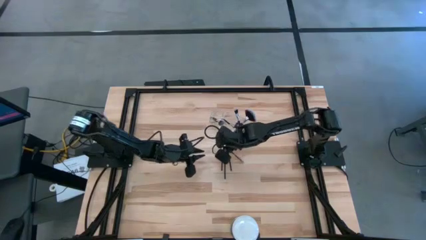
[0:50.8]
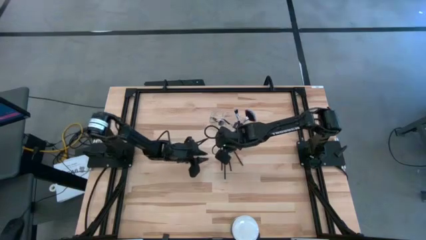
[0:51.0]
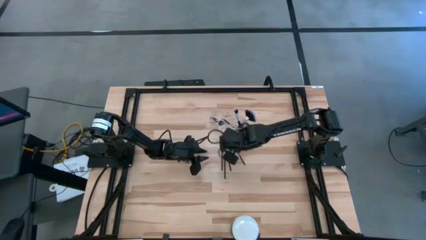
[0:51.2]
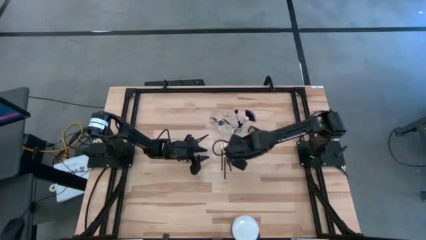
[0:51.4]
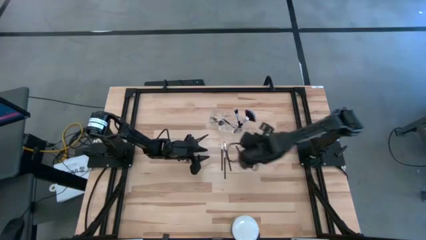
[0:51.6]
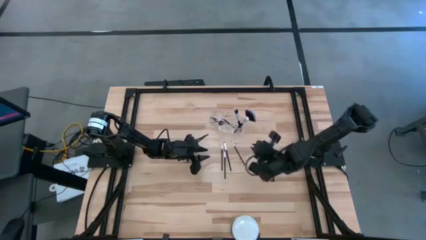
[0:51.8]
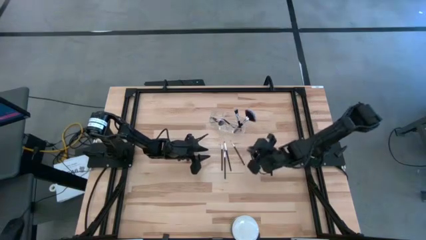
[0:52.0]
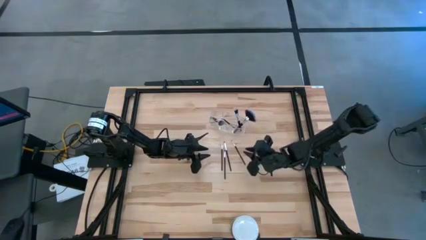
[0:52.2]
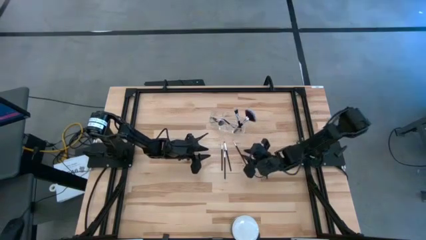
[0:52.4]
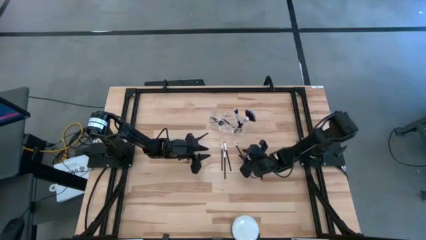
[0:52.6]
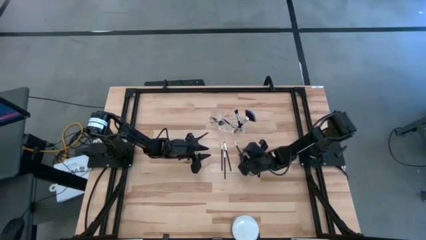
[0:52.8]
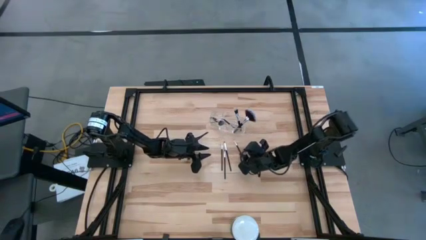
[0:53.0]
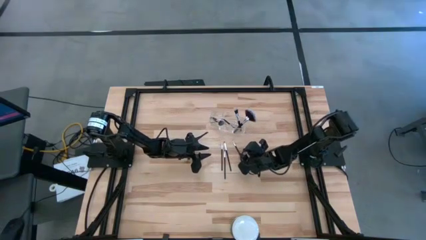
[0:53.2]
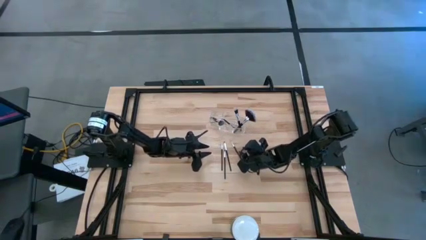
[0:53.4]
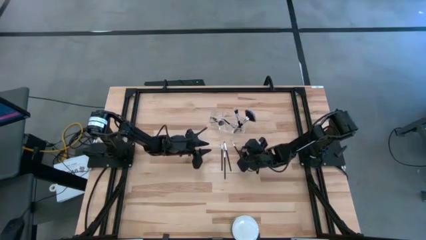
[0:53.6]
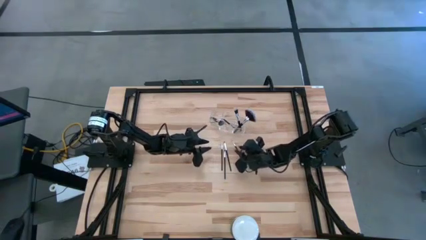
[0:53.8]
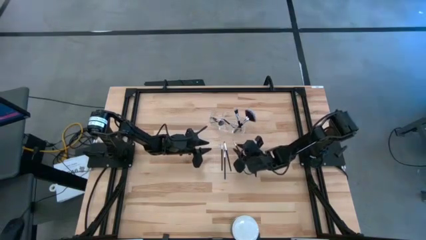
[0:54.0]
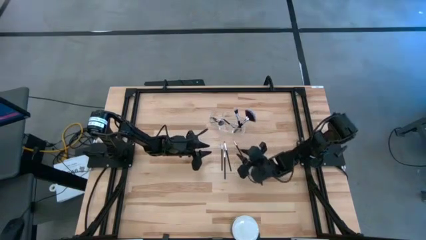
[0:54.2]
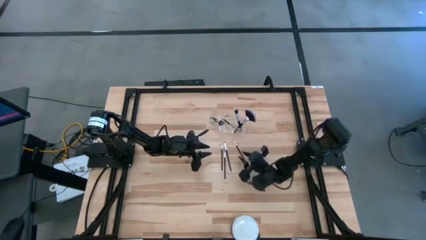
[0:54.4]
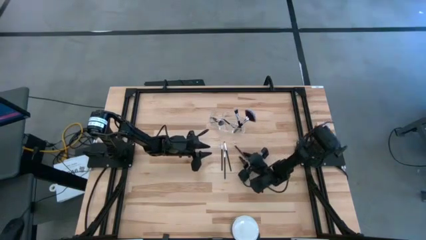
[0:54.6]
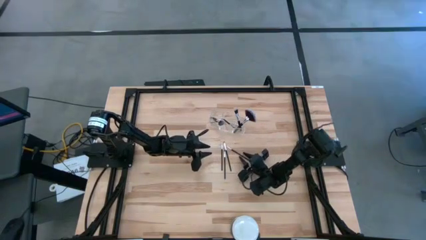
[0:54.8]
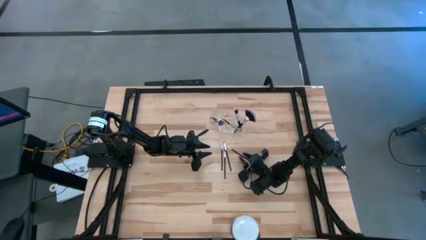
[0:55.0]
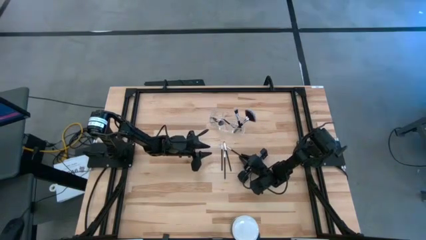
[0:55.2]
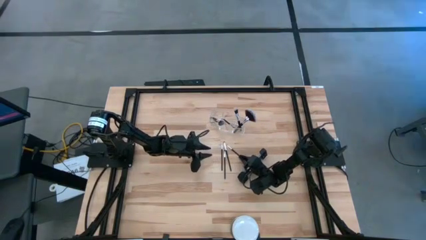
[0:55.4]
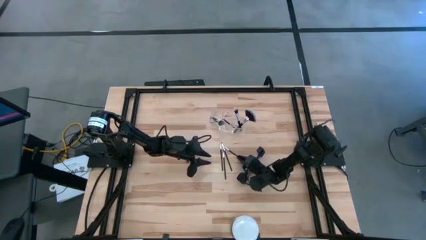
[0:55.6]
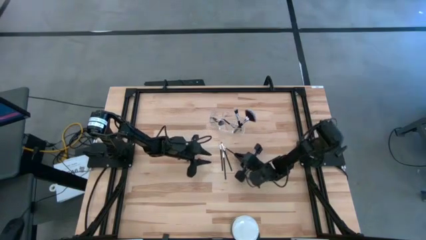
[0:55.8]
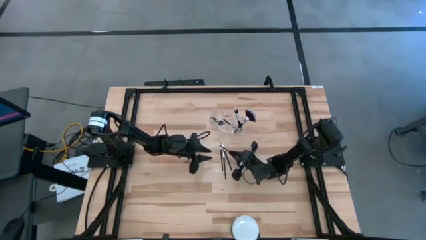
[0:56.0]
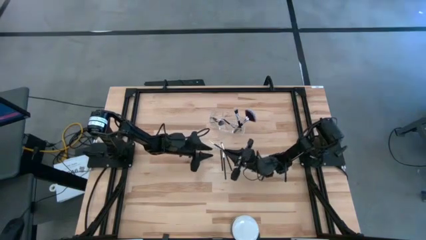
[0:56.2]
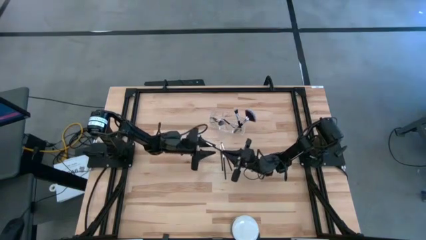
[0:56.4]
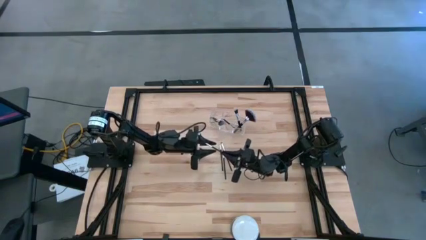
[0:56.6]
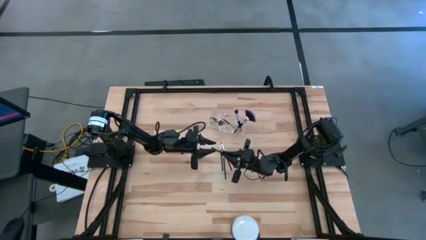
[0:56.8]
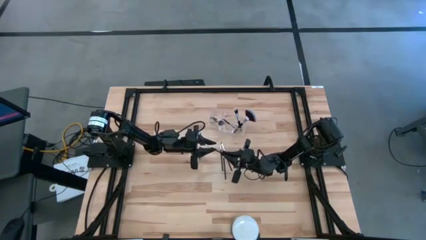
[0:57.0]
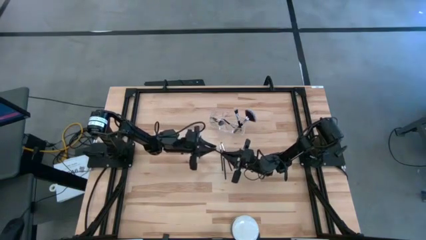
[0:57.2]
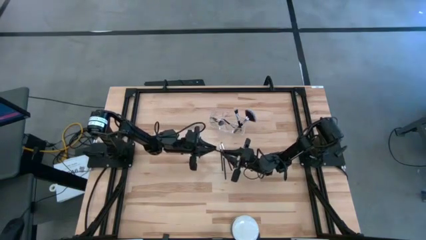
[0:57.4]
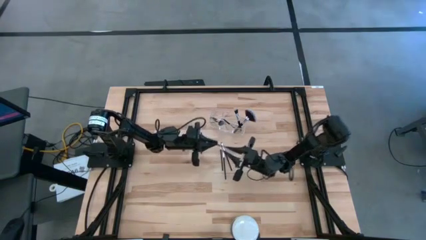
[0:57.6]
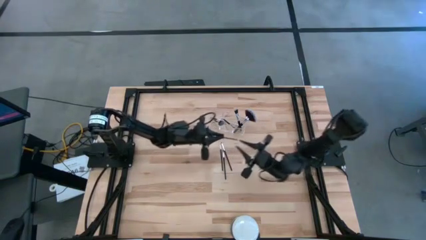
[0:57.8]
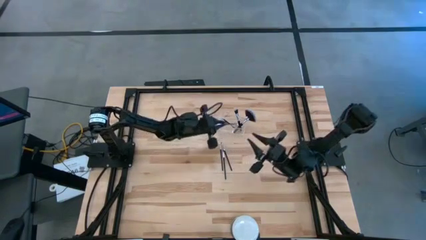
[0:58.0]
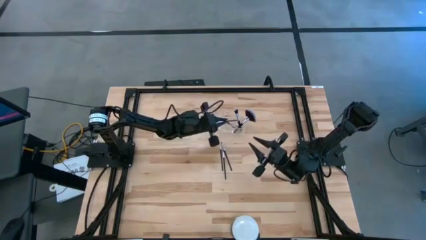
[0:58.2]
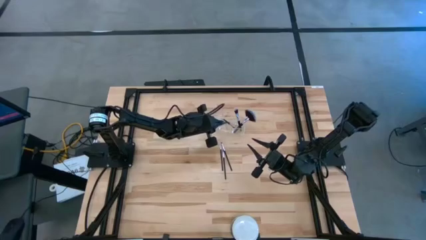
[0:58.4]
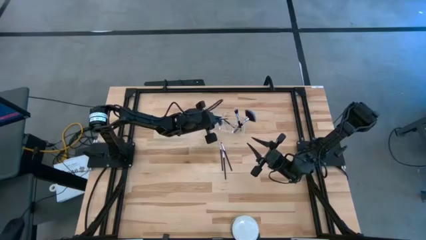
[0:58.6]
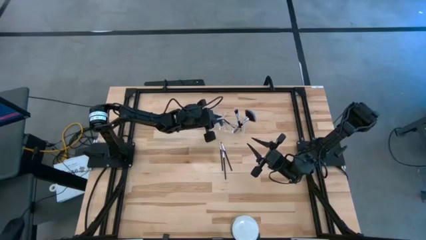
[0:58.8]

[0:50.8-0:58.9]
Task: Put items in baskets/containers
Put the black liner brush into the transparent organizer

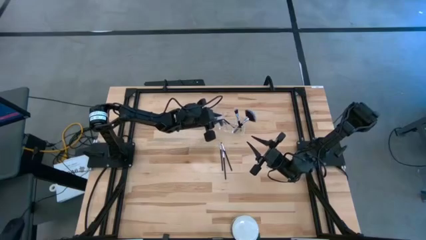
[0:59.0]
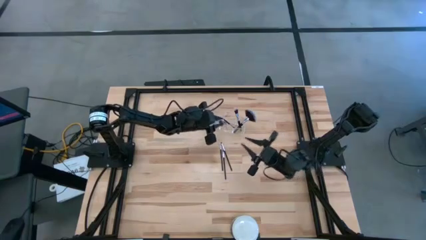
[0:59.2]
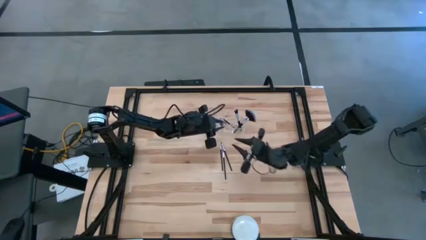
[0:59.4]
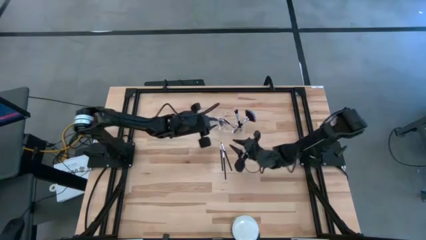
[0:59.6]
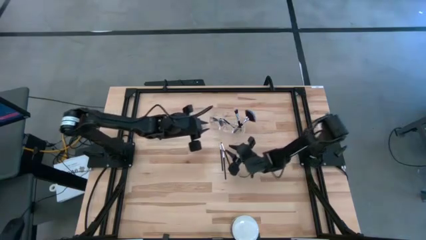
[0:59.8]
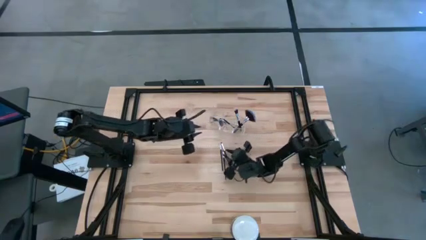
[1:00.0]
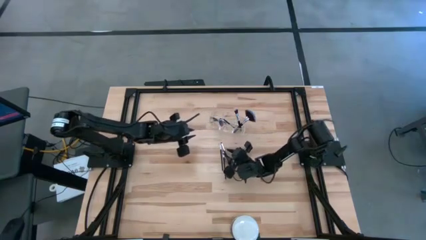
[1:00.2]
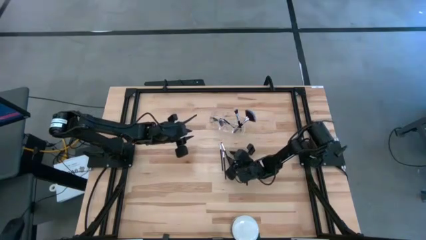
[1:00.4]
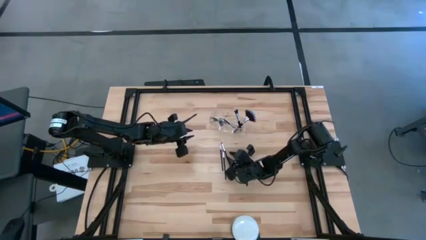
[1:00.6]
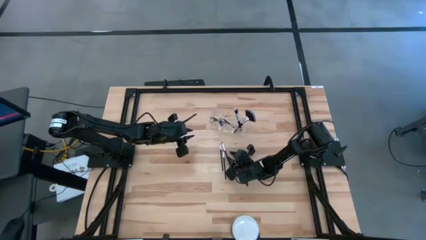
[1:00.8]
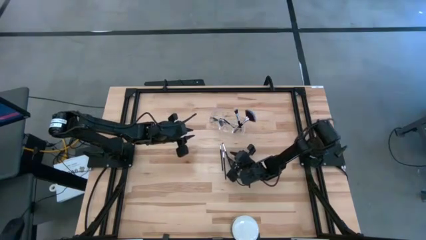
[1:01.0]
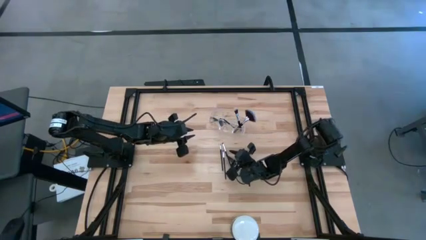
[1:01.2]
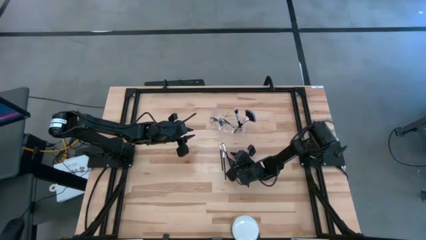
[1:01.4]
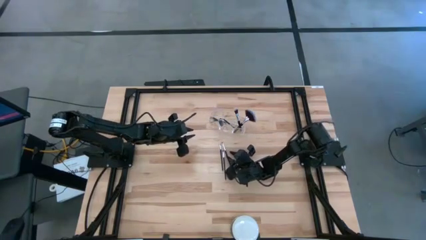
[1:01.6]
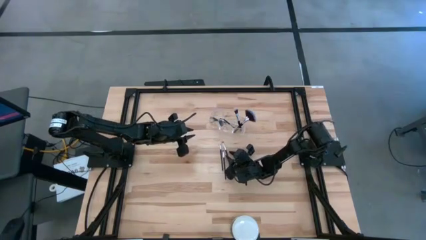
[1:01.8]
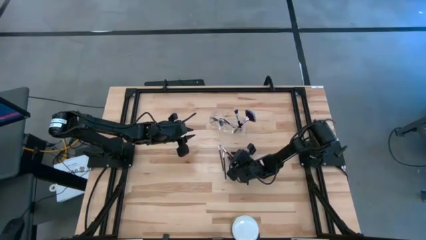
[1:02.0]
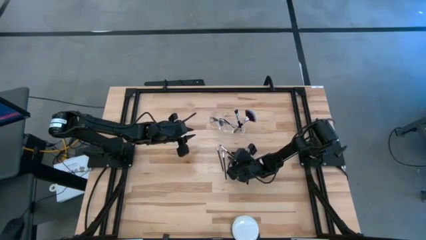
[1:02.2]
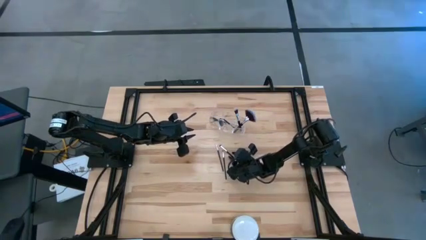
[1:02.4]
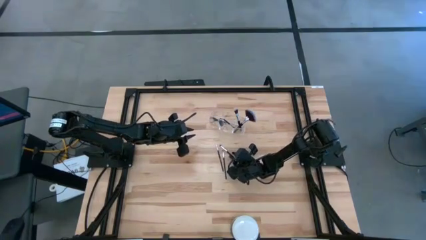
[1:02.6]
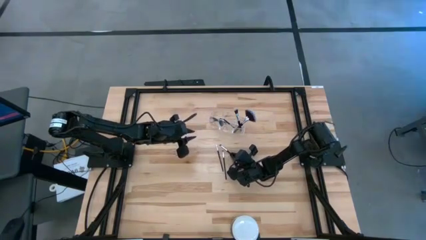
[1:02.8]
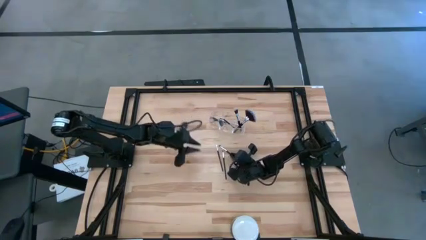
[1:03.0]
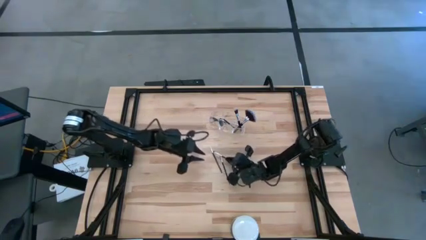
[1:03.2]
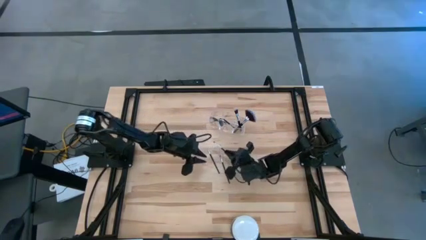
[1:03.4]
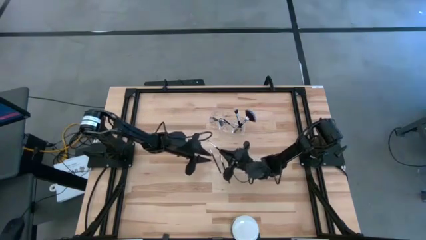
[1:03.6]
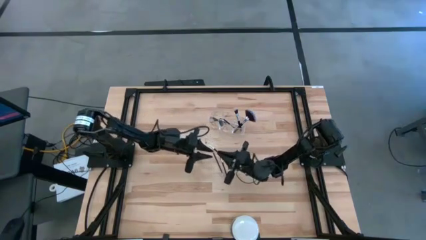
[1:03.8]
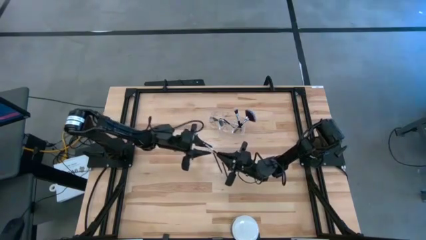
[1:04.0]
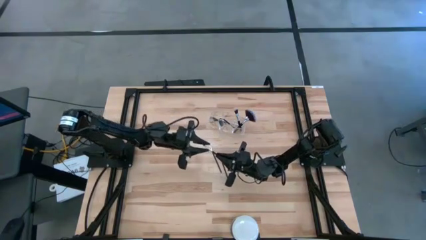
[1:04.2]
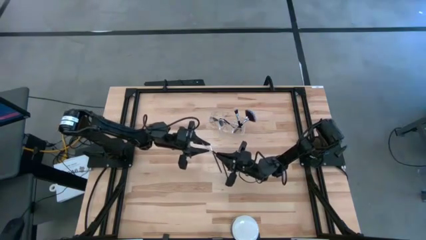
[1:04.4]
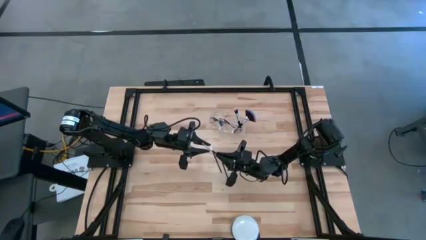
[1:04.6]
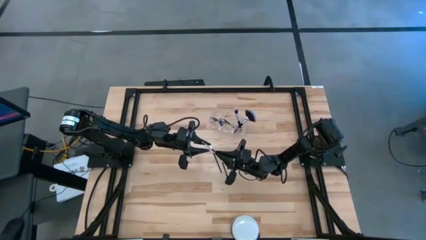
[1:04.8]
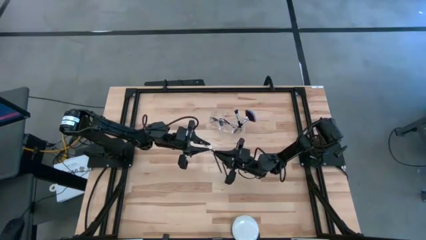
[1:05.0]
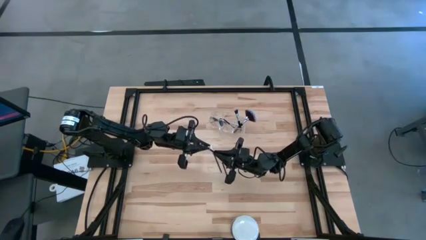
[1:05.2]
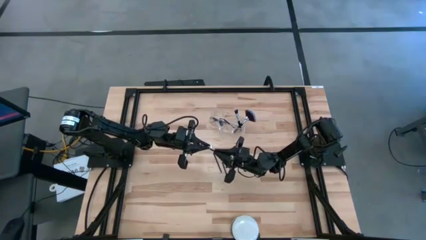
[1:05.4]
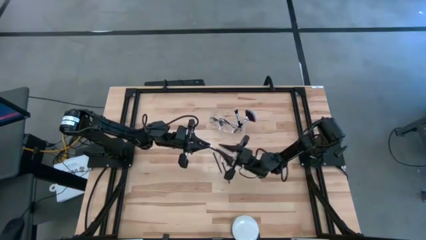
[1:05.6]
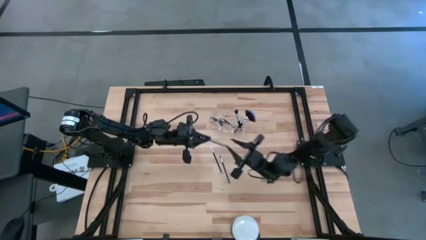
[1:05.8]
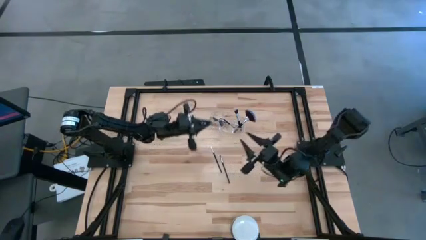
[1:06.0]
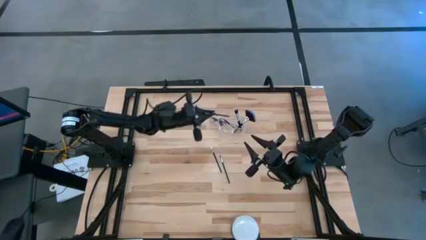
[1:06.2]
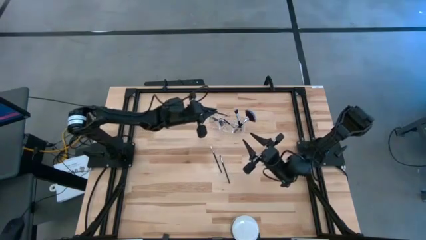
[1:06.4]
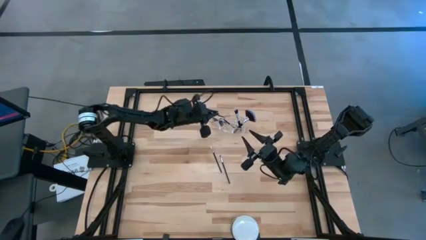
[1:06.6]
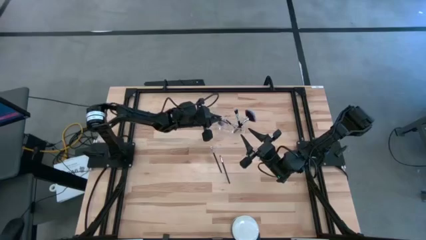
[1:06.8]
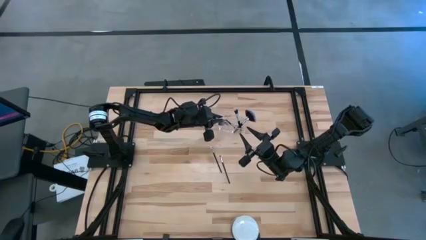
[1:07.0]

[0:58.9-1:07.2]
Put the black eyeshadow brush into the transparent organizer

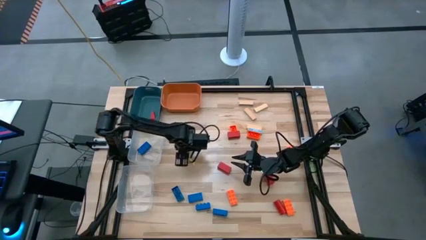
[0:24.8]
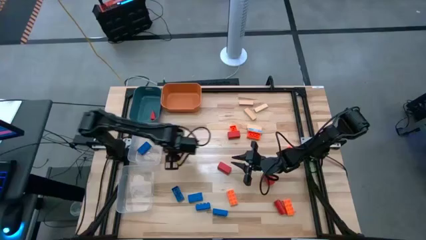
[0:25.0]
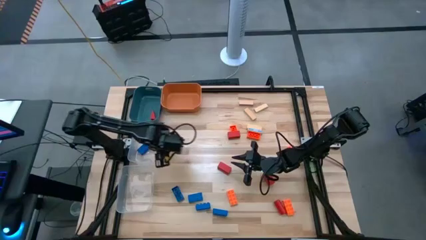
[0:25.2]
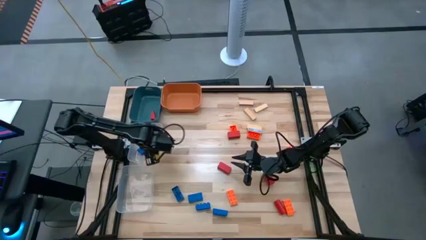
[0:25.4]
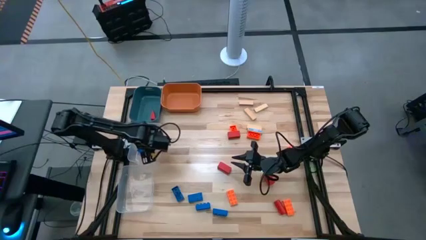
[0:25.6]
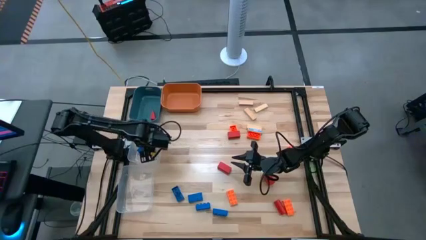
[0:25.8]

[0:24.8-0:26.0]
Task: Sort blocks
Put the blue game piece into the top transparent bin
